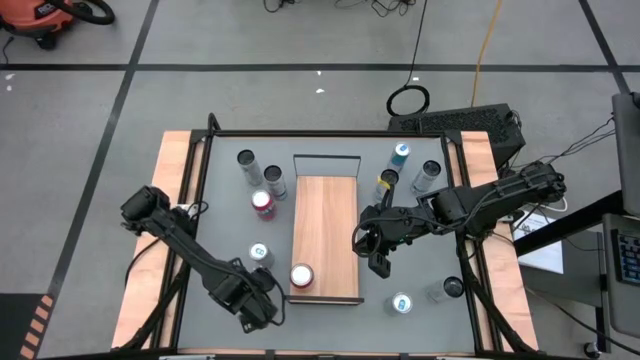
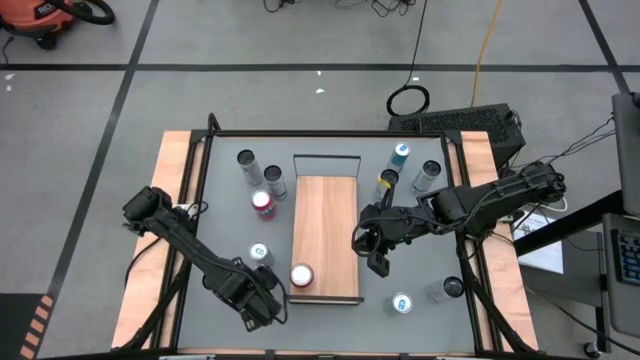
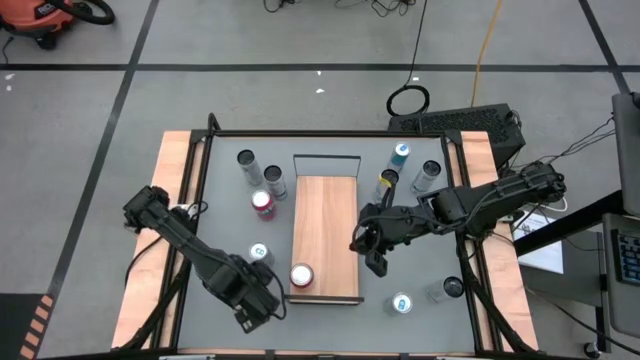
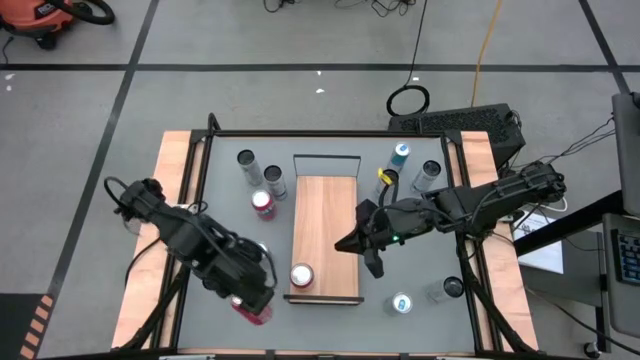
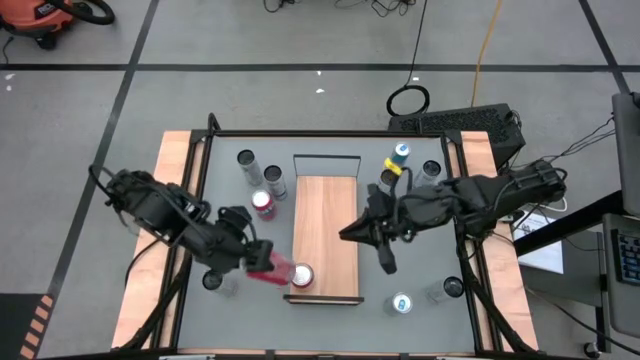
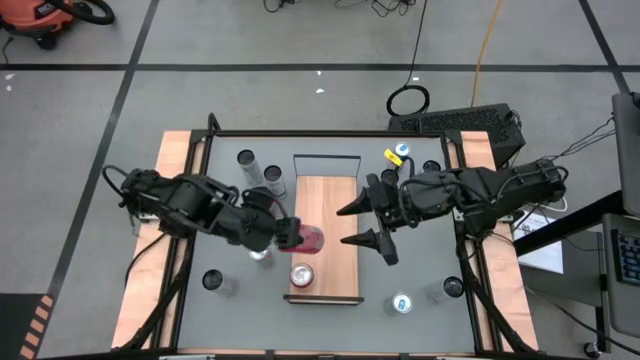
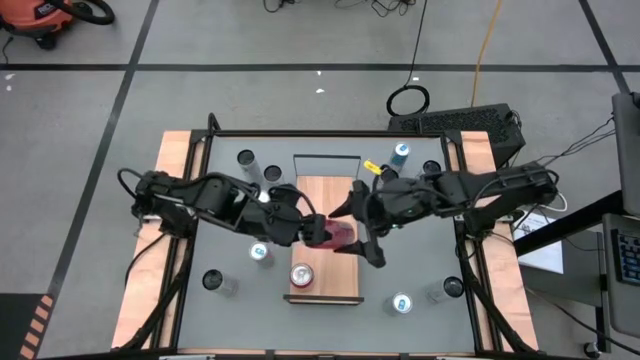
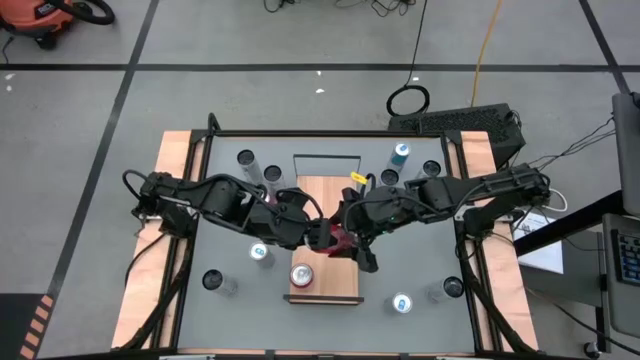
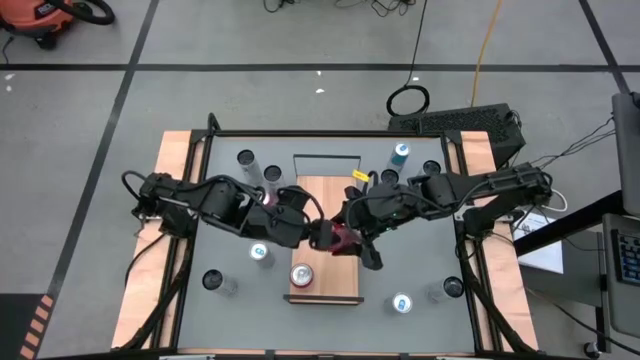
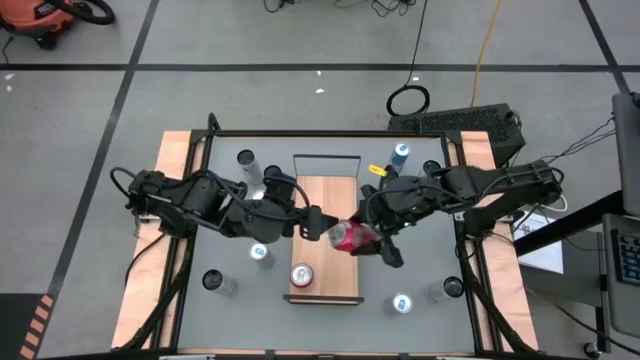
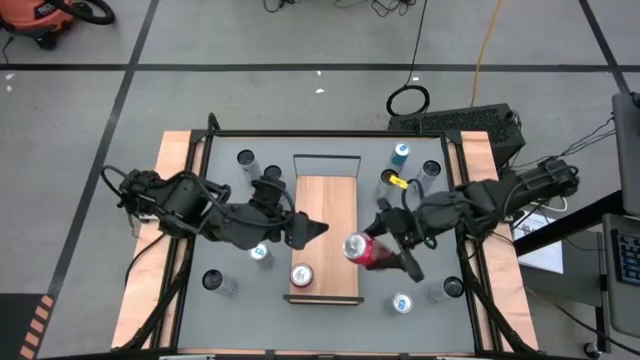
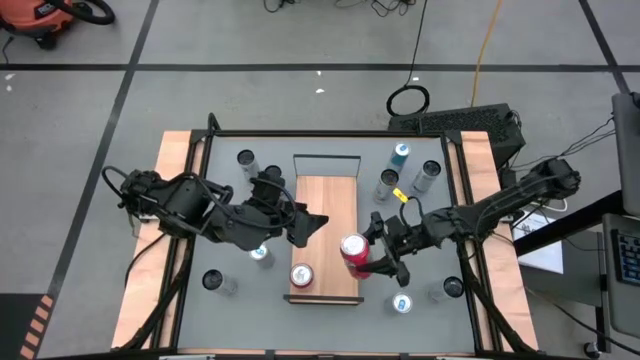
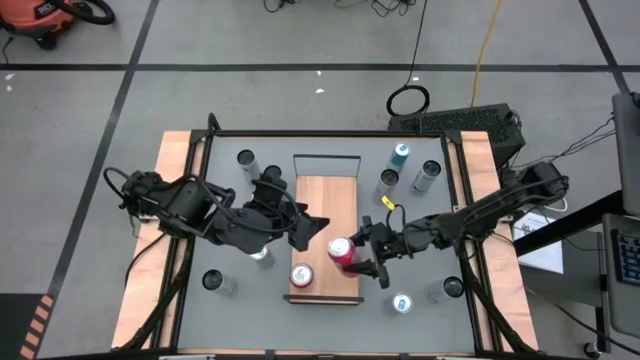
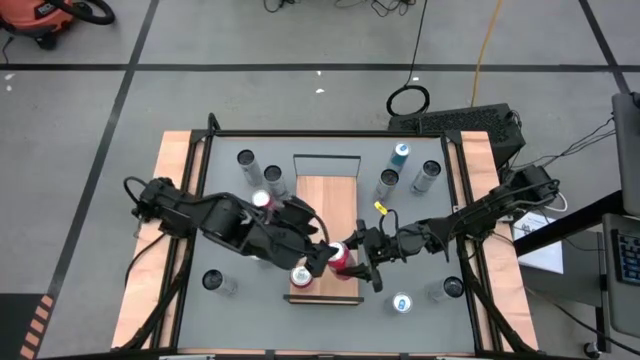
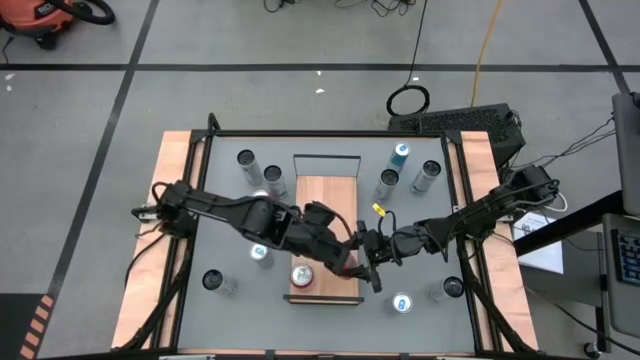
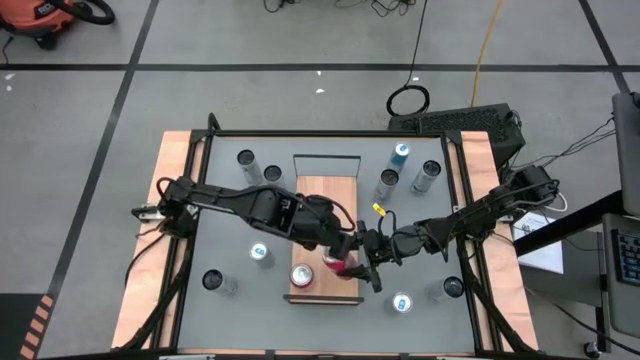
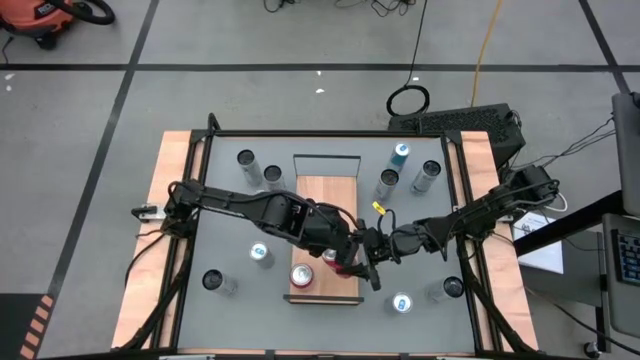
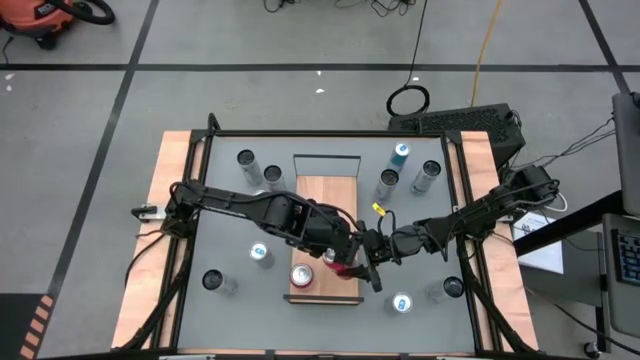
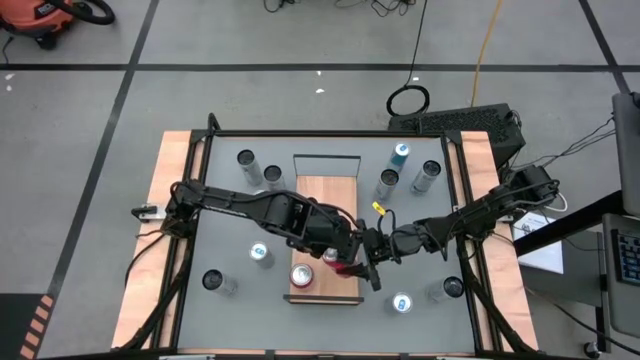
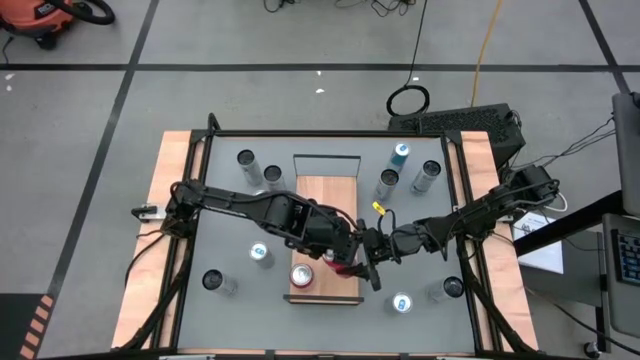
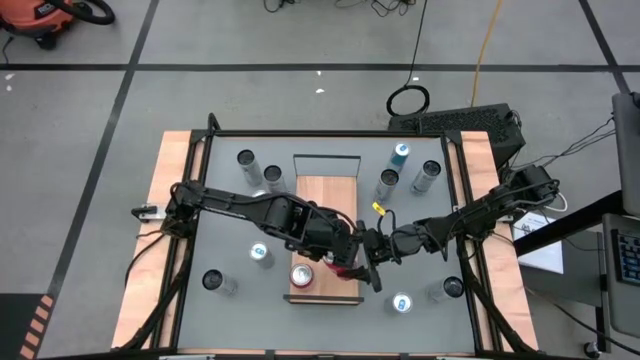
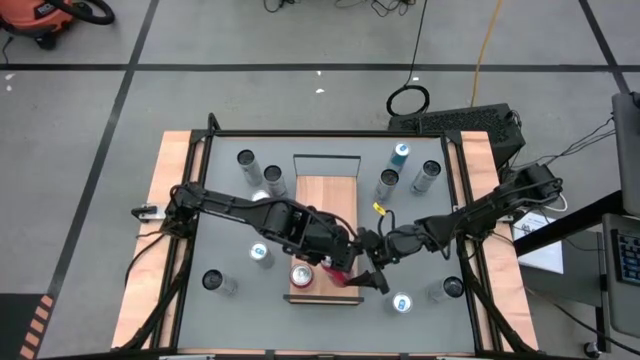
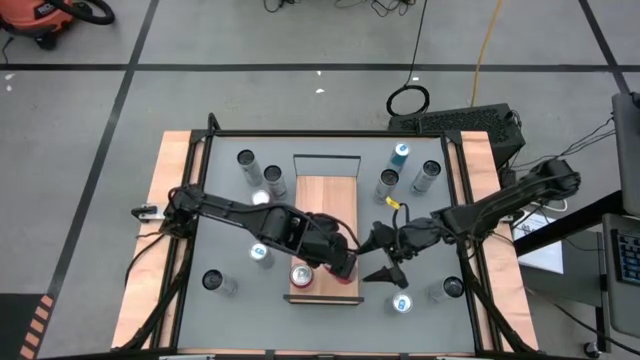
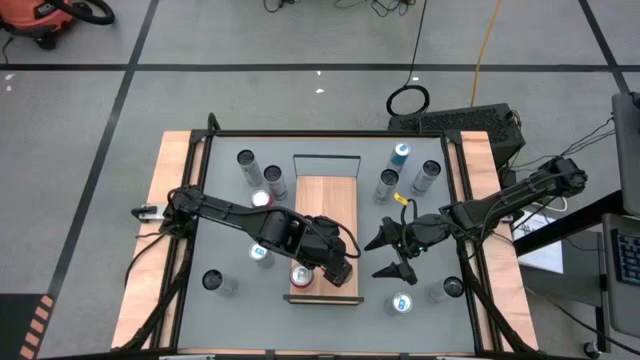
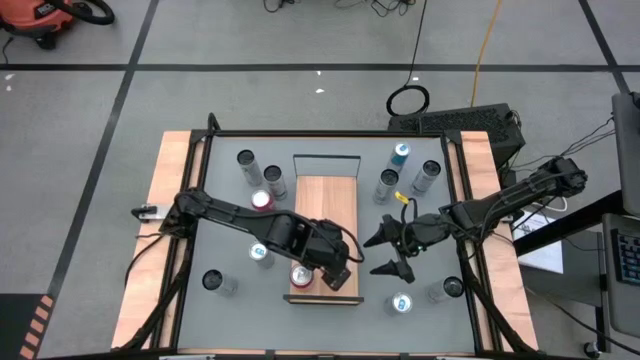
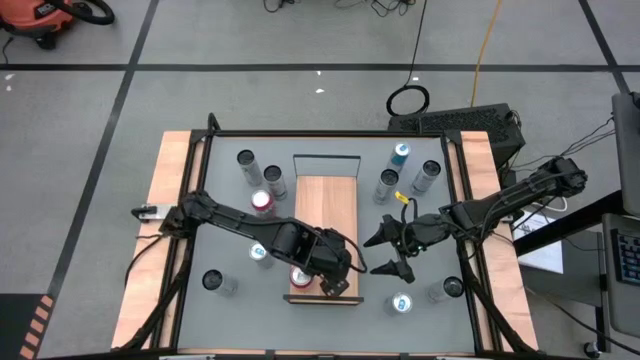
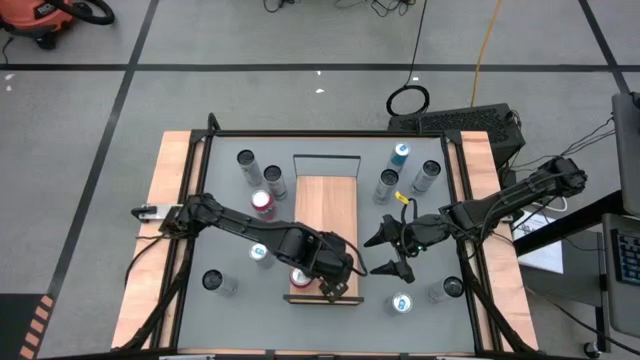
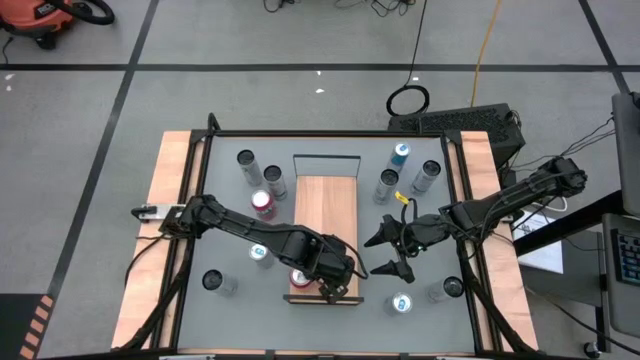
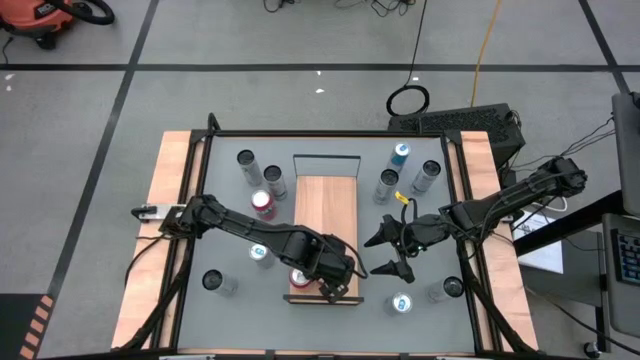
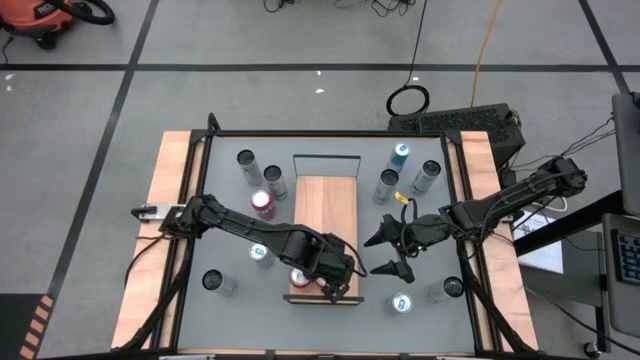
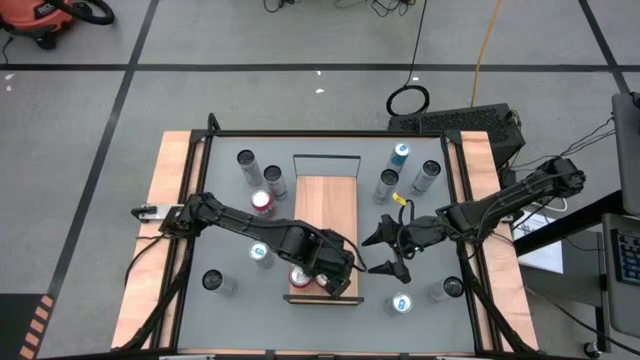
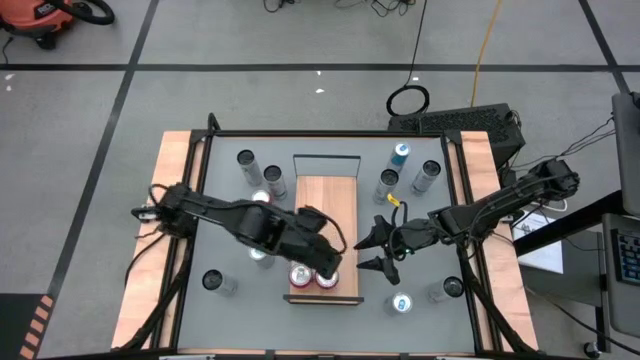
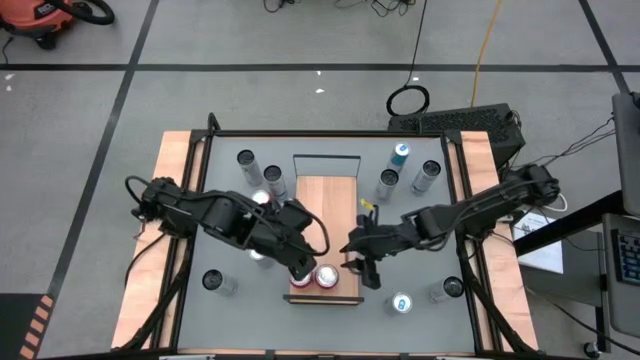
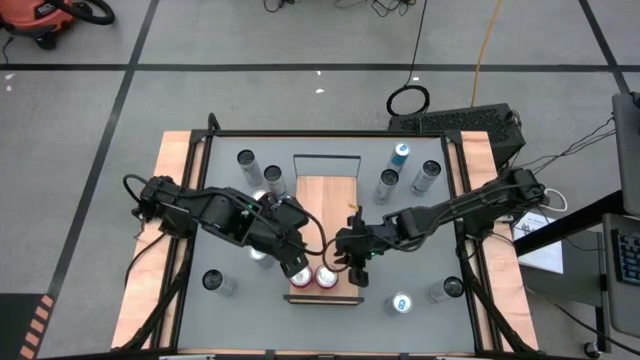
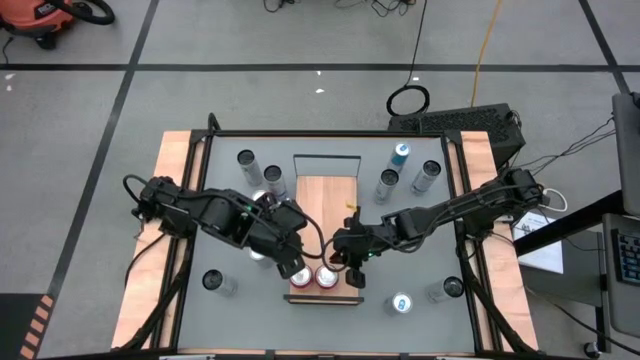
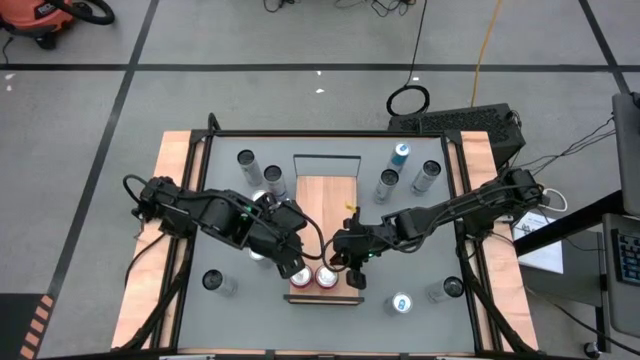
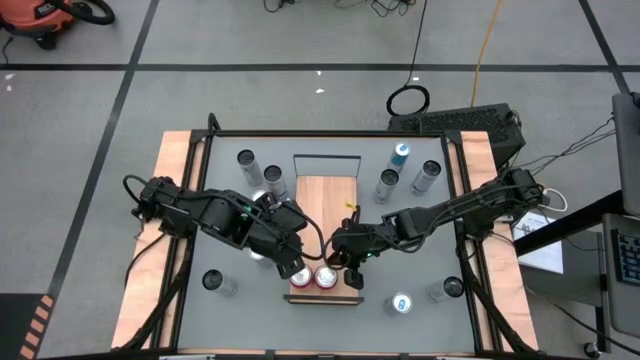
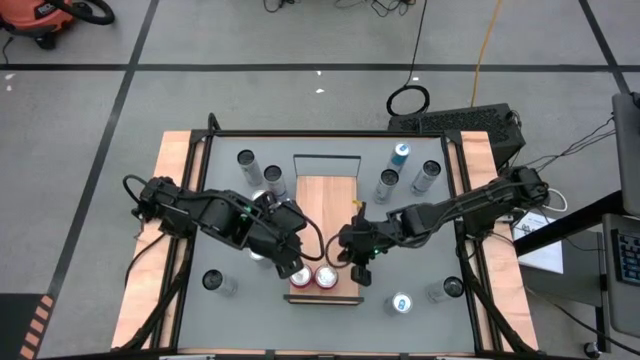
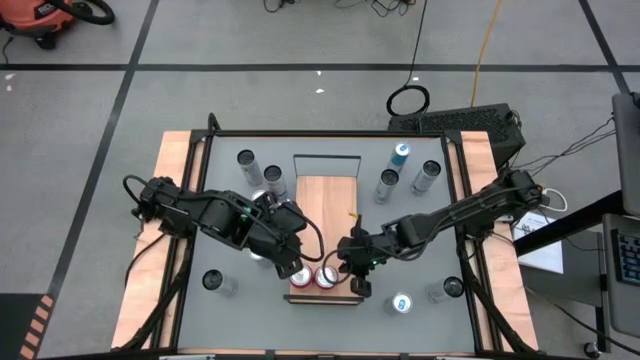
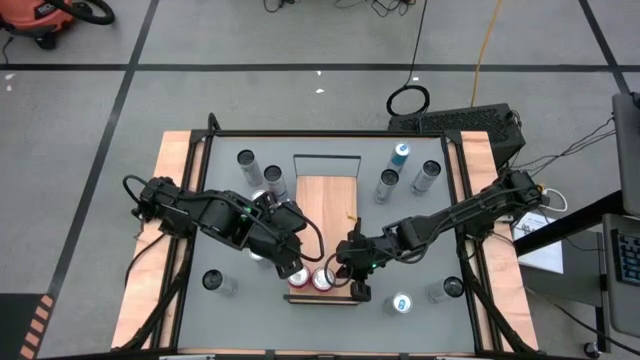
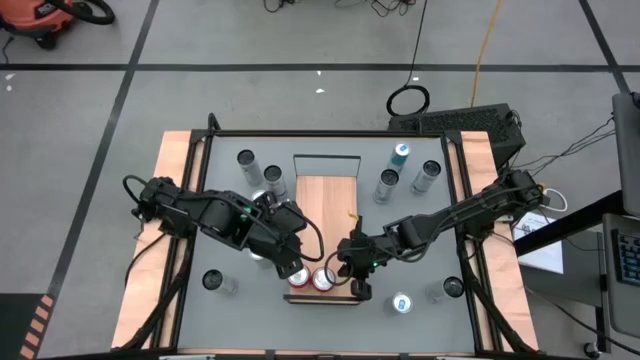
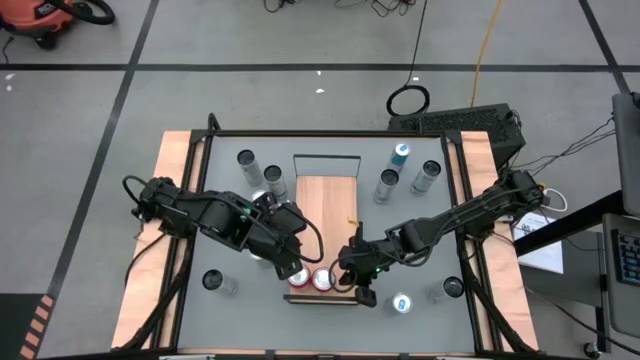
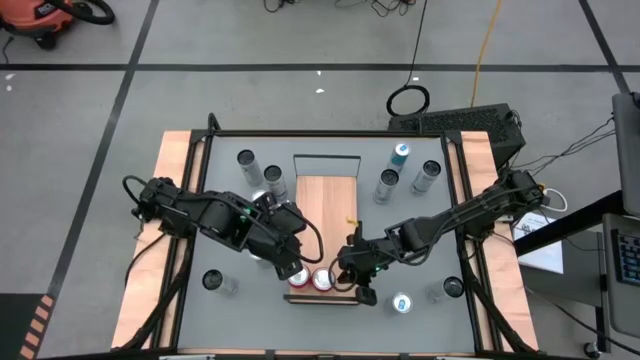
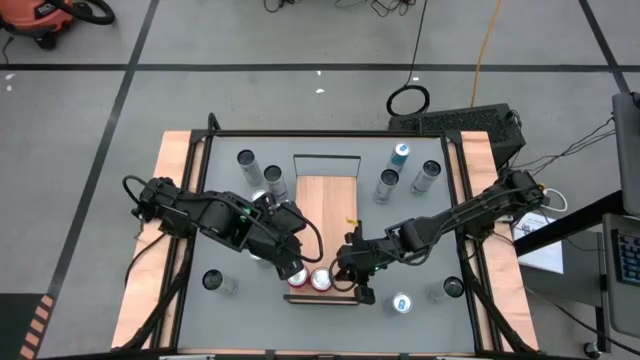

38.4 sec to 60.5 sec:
Task: Sort soda cans
Put the bottom red soda can on the shelf and align it with the other red soda can
